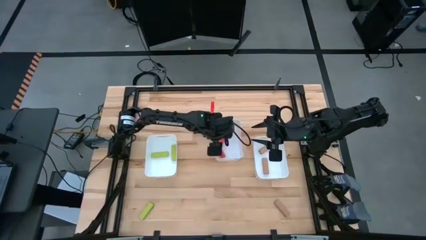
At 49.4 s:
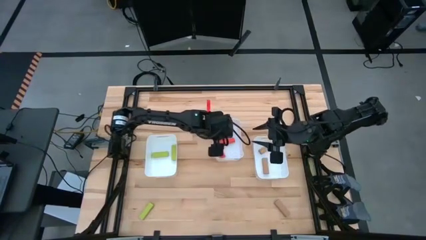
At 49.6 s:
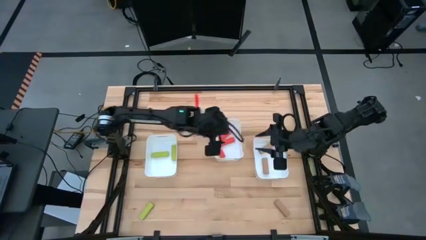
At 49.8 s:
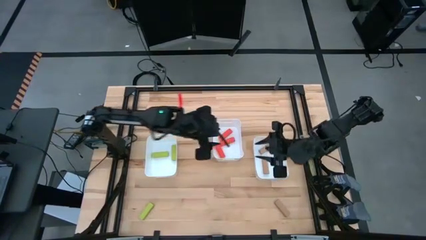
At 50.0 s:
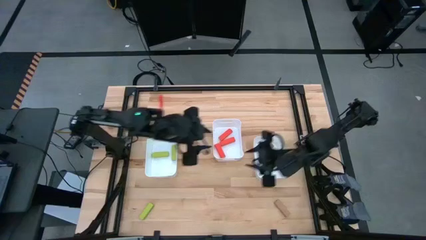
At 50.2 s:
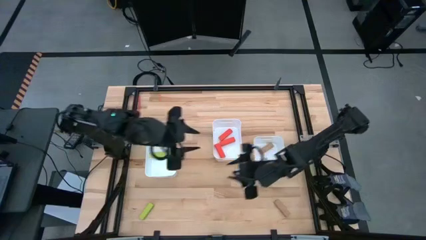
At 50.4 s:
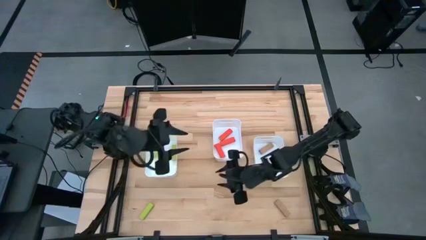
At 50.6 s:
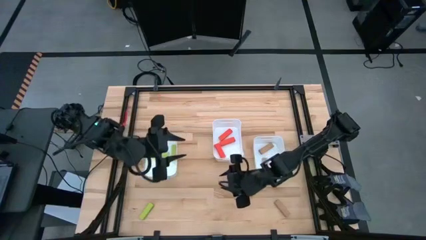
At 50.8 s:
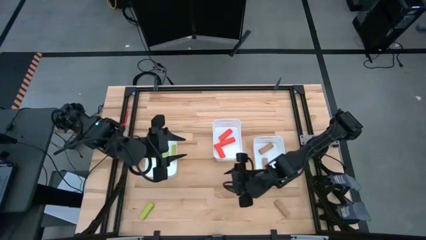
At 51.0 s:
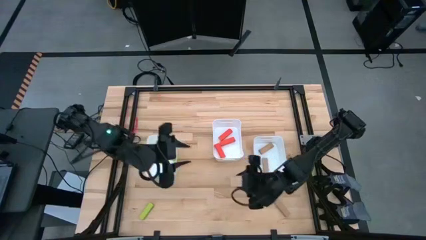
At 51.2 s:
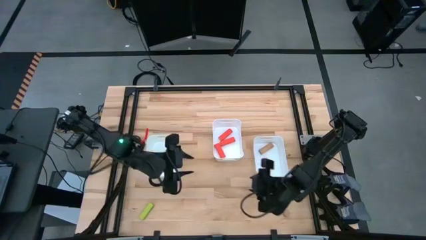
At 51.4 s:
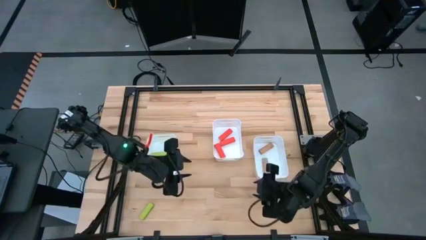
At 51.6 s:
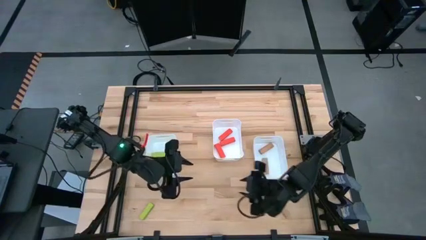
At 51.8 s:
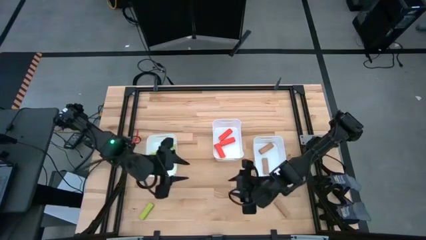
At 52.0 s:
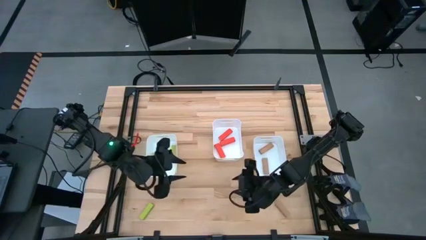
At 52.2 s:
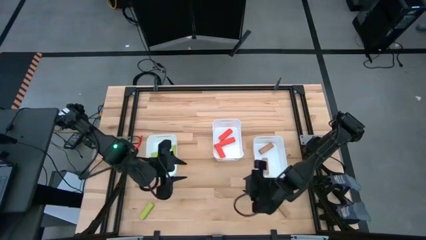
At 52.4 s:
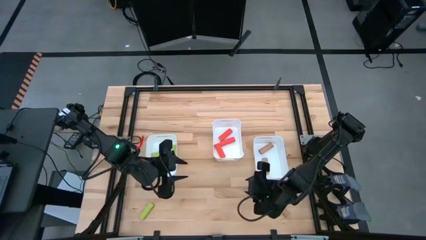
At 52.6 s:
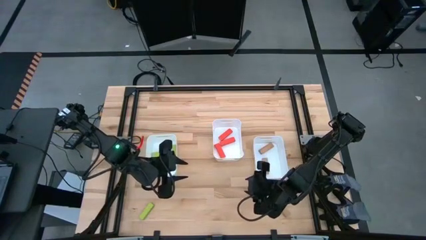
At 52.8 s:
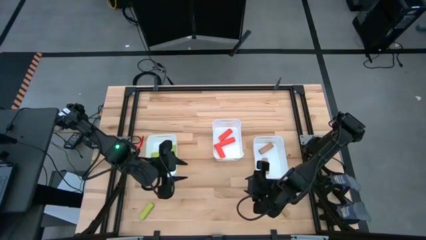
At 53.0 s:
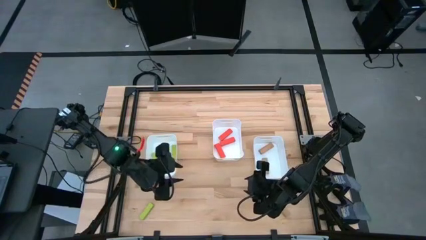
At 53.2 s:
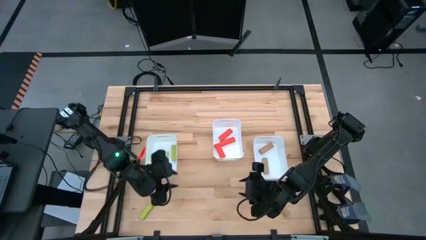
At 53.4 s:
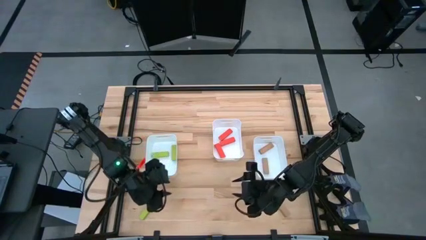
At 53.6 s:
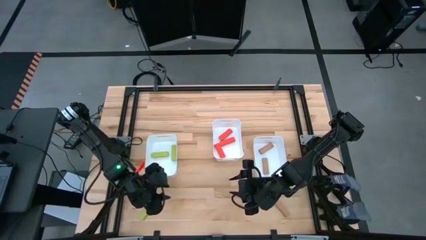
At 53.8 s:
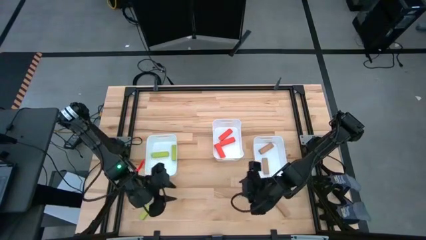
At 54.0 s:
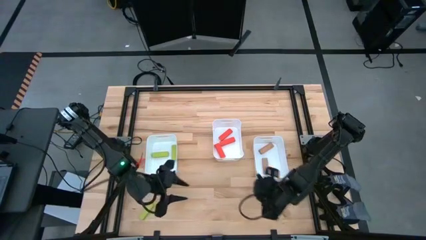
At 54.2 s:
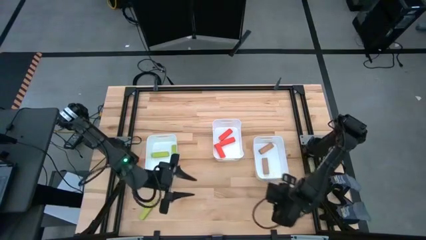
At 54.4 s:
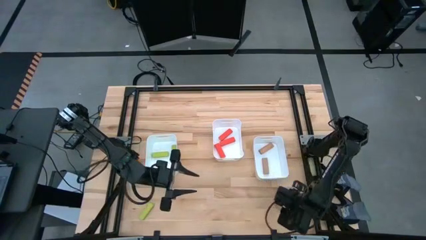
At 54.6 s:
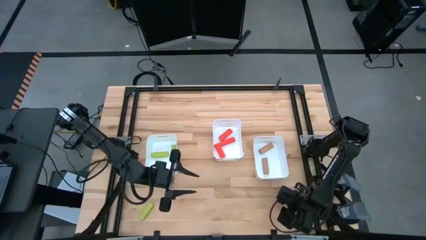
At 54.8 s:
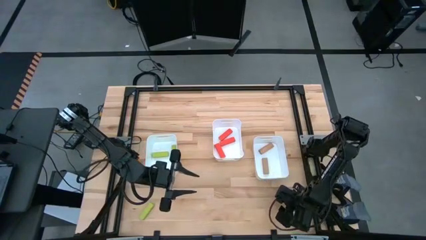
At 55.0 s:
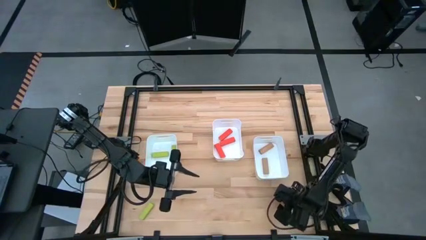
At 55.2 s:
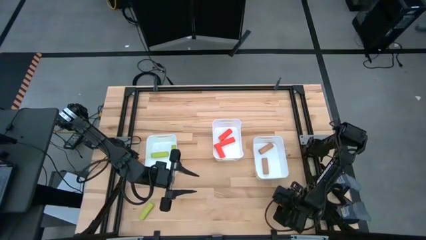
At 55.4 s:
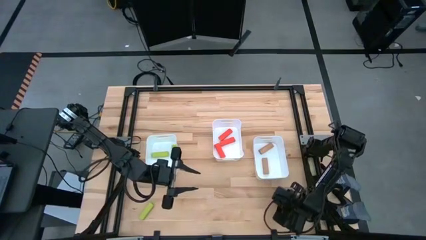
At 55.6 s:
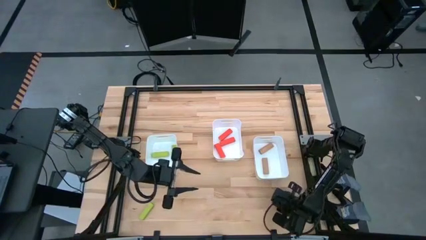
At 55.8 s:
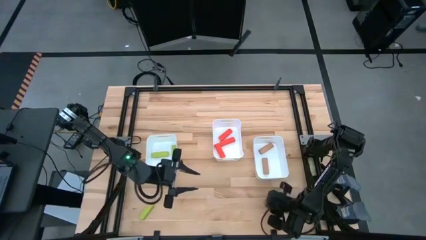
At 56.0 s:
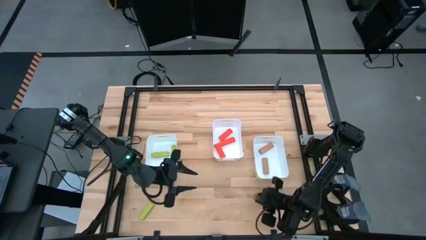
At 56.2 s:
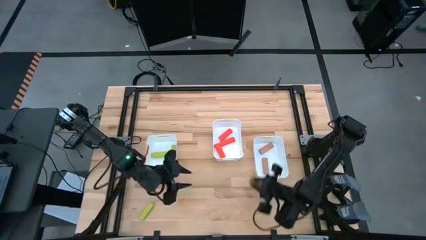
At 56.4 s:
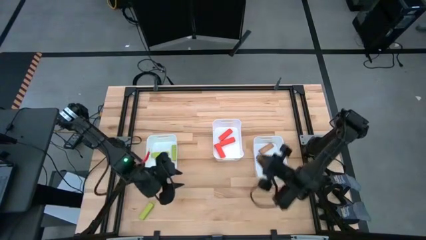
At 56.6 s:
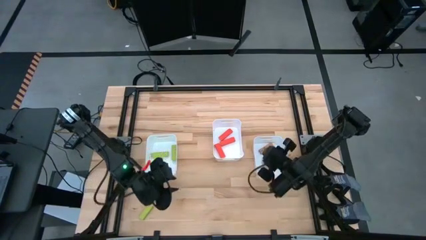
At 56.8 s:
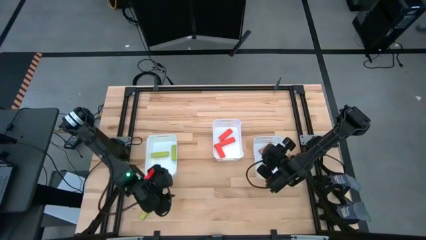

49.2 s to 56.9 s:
Task: Sort blocks
Put the brown block into the right white bin

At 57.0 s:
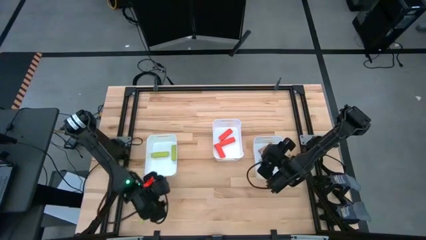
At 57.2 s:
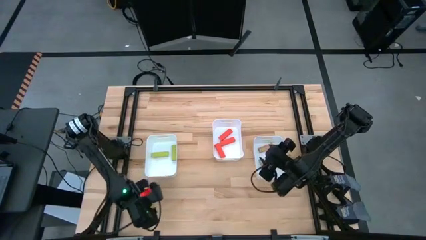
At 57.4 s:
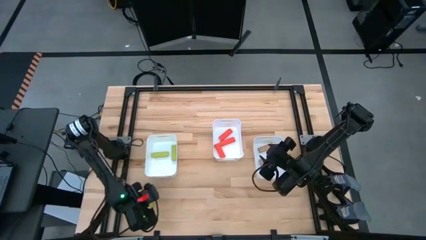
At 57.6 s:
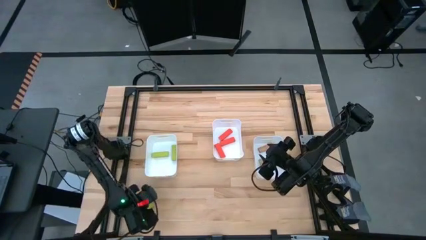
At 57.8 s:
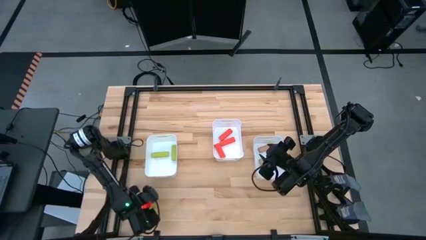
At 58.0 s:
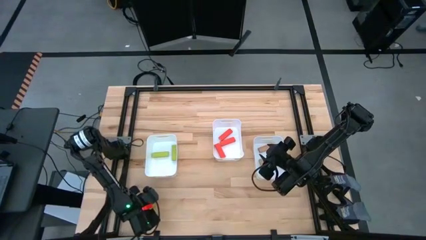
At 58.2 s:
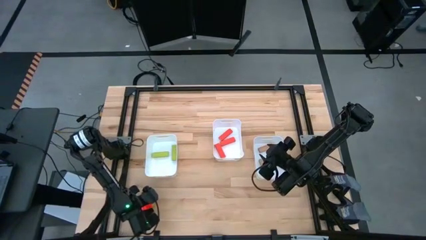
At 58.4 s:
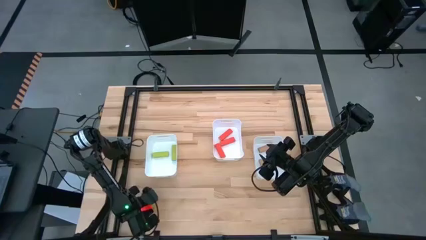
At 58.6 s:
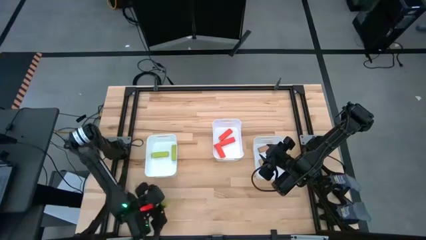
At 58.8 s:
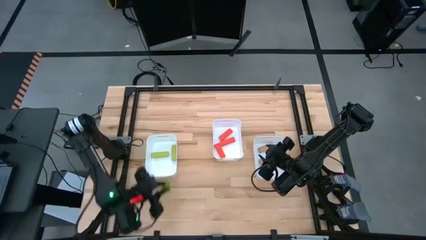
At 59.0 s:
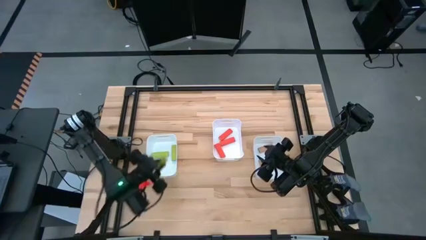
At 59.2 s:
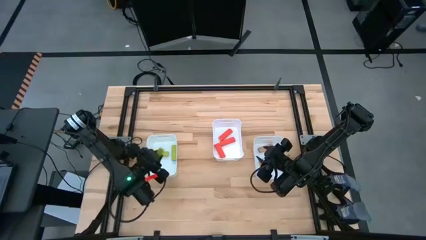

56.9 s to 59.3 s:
Put the green block into the left white bin

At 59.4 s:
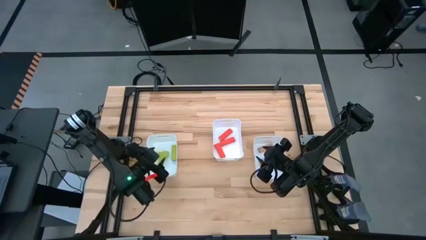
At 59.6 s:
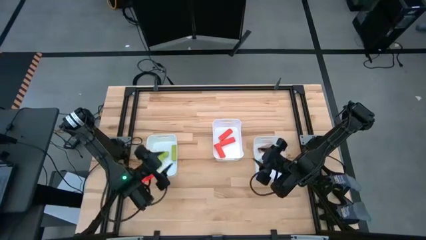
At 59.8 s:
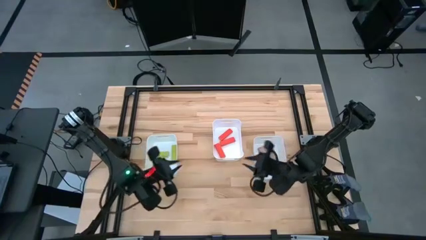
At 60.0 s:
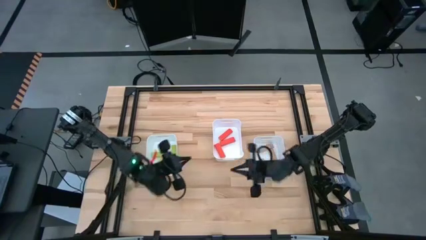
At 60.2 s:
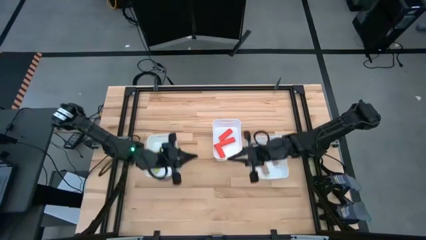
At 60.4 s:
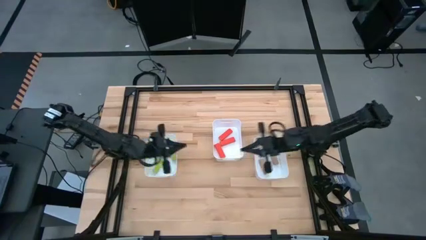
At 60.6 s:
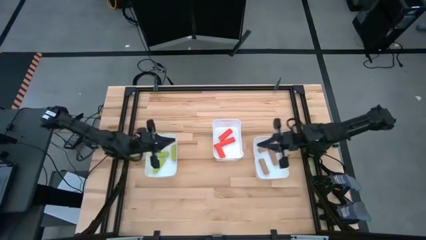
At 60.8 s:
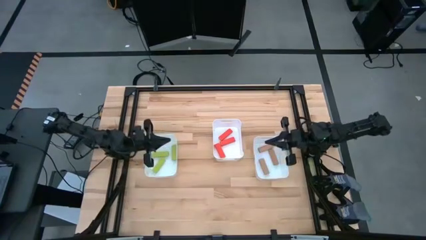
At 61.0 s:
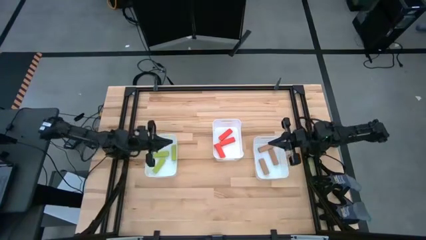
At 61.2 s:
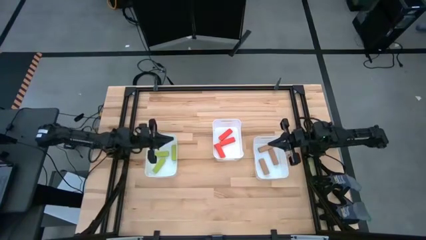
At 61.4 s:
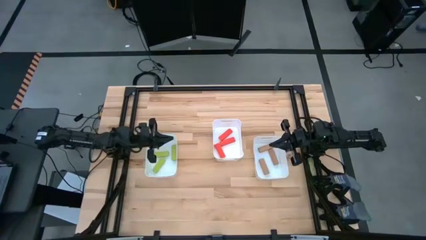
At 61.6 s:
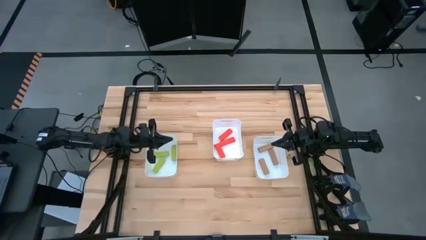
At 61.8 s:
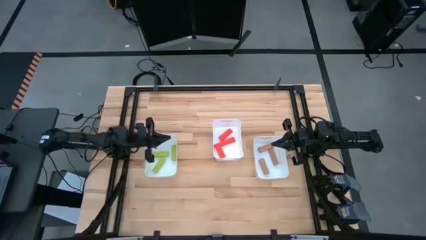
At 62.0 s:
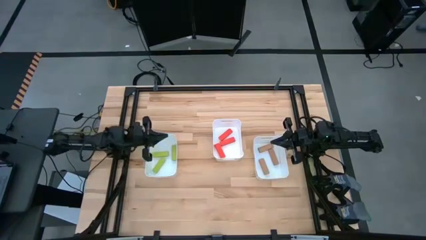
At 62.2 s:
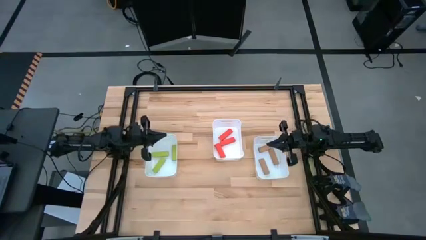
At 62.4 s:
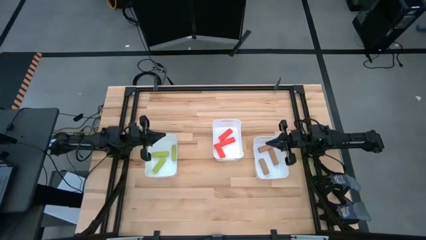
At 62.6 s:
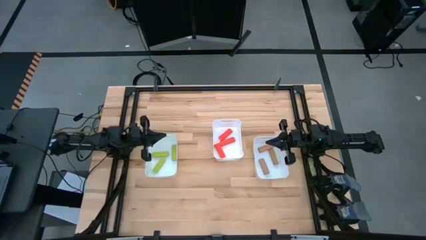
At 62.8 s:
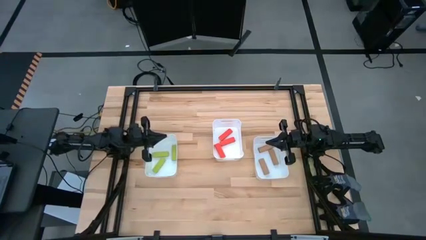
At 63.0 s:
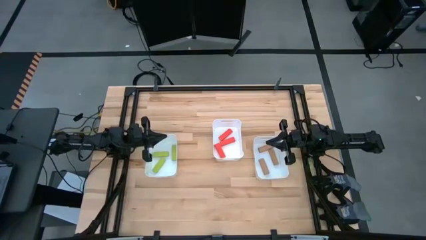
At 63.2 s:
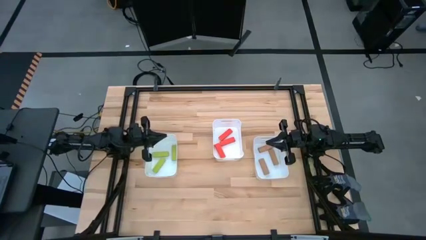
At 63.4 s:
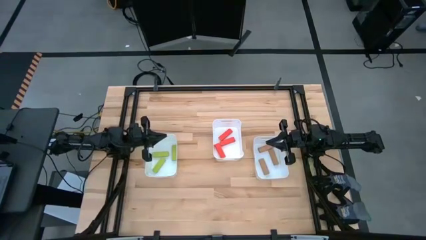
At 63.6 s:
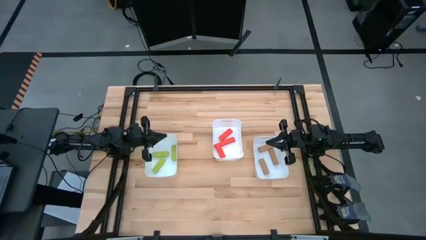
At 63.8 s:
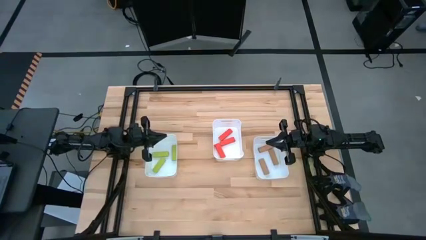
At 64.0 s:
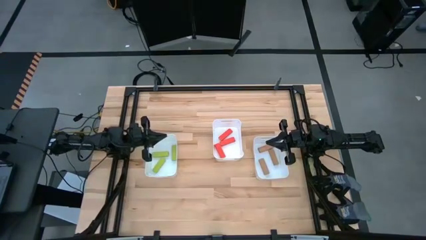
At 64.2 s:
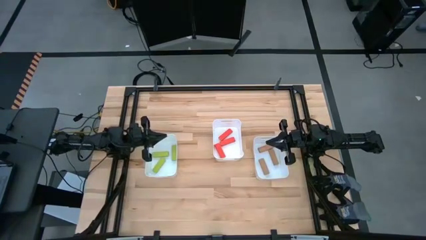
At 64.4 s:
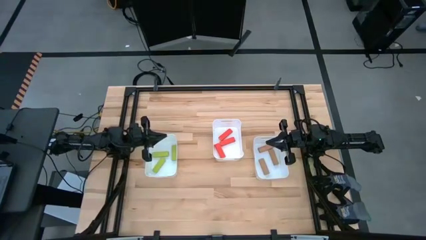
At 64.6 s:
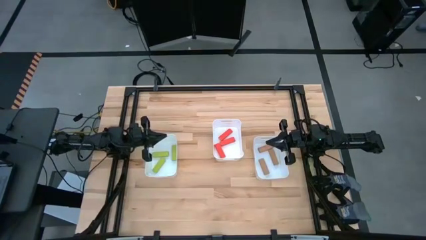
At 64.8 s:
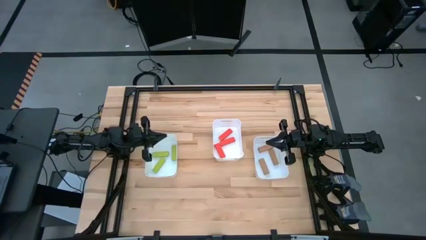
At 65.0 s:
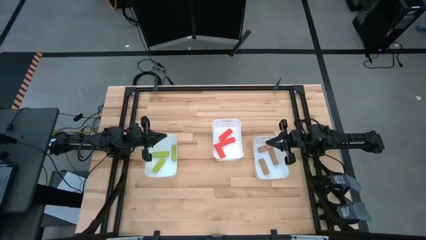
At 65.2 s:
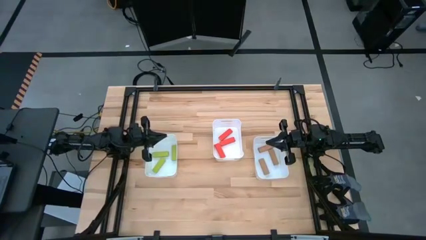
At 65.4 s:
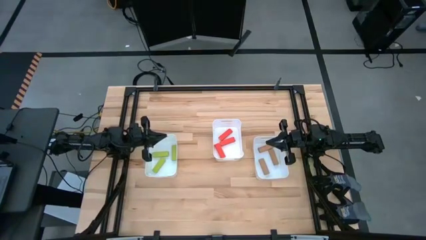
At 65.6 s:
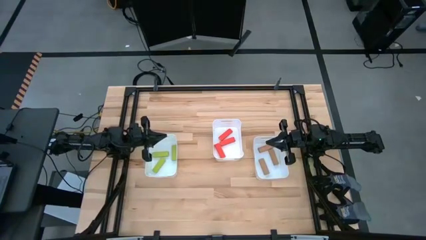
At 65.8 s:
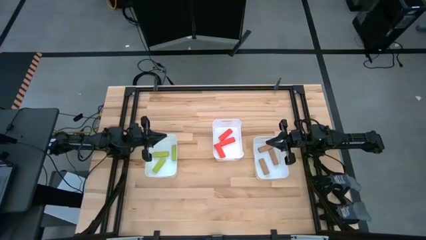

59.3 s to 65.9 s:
Return to Home Position
